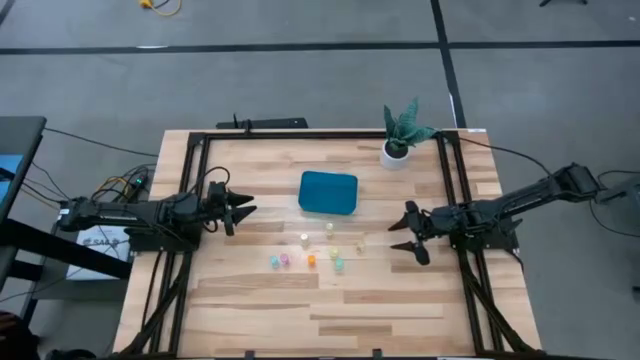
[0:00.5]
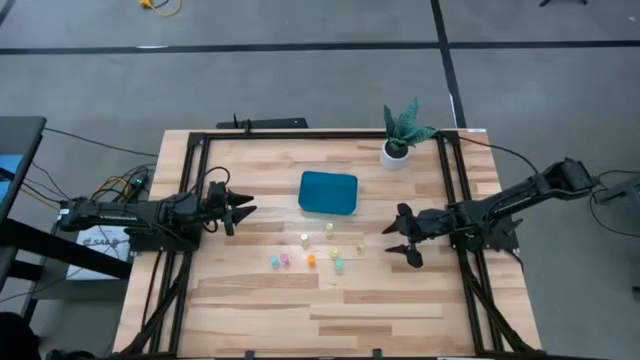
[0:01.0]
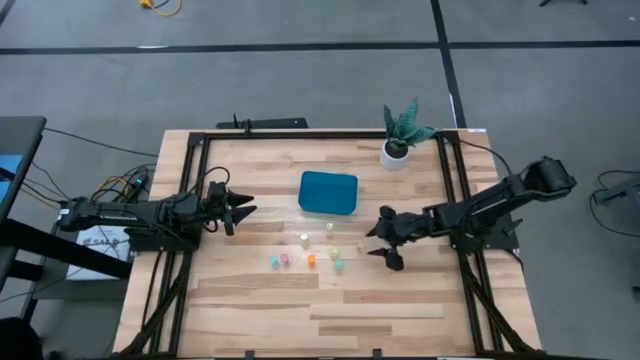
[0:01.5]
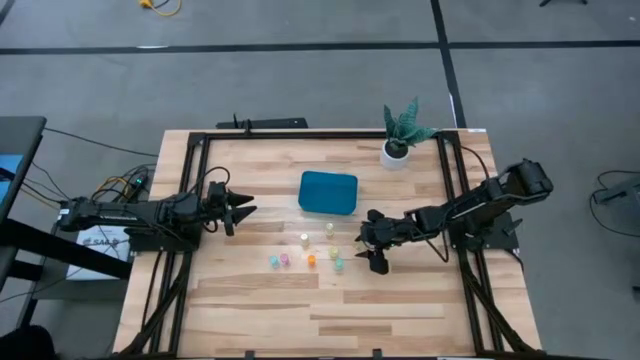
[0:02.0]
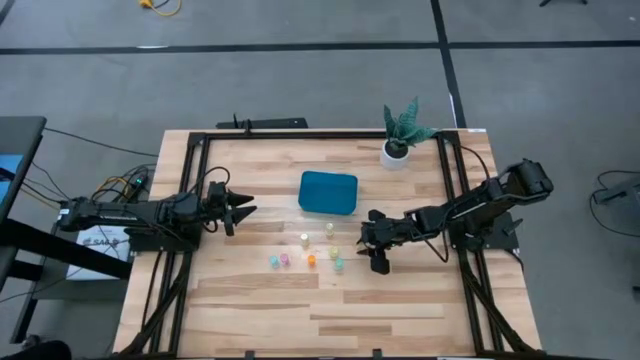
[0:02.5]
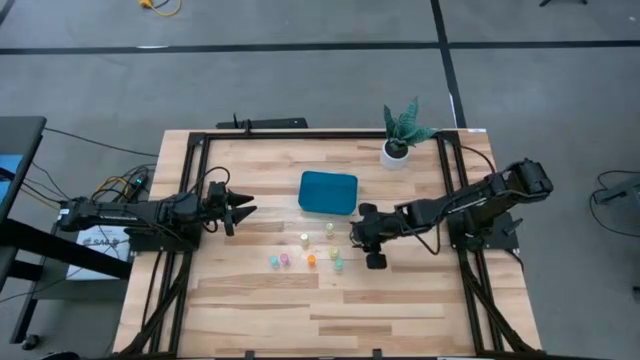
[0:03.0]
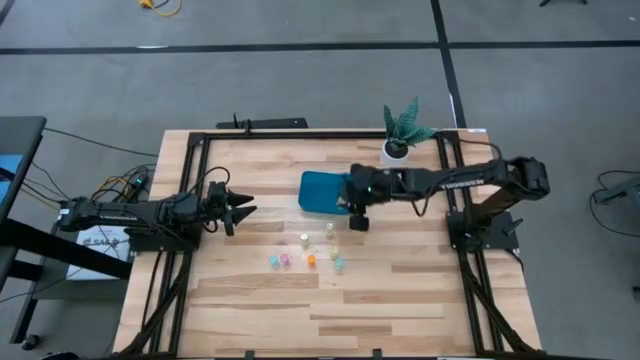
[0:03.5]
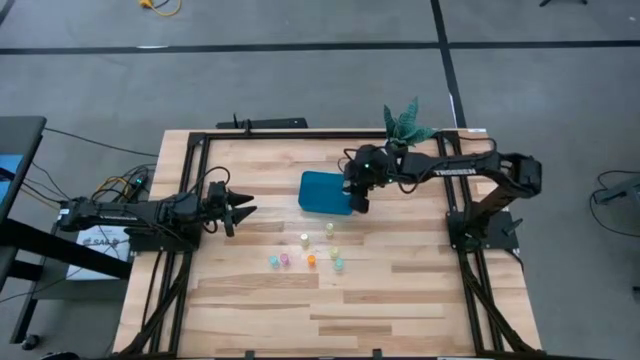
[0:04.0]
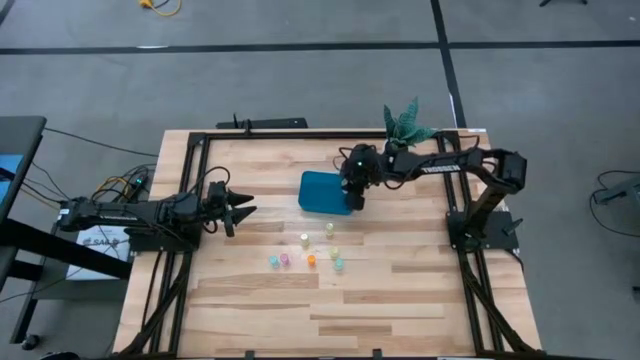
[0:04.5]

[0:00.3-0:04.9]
Task: Pick and place pill bottles into a basket
Put the green medicine bottle into the blue bin

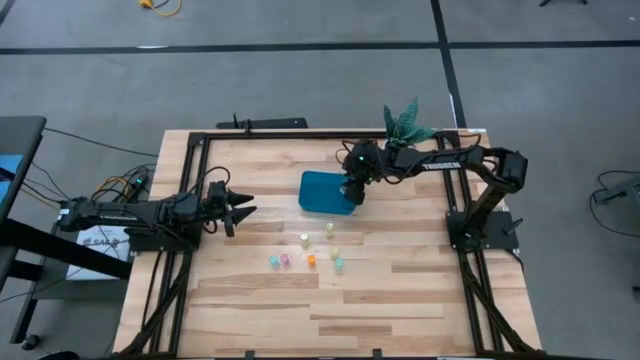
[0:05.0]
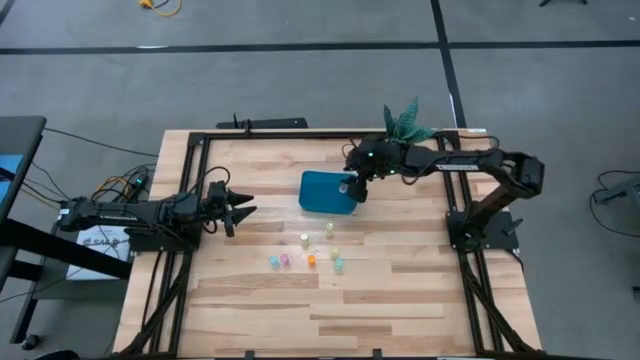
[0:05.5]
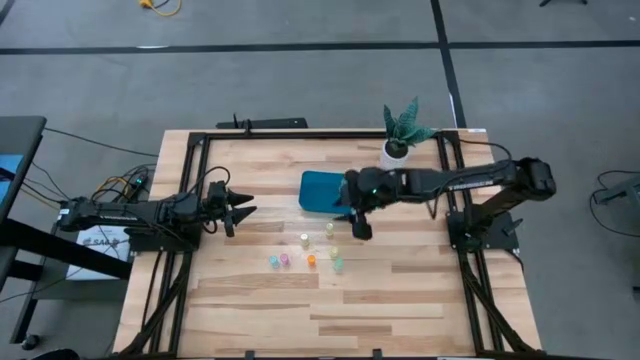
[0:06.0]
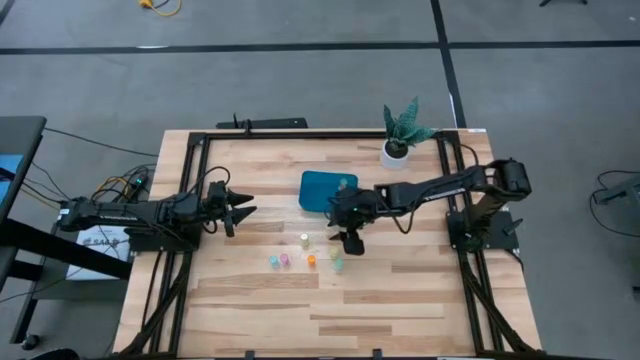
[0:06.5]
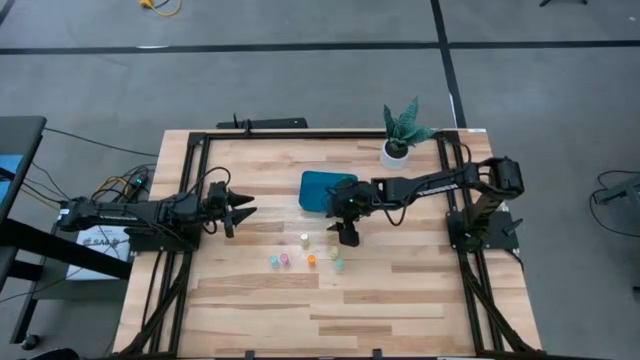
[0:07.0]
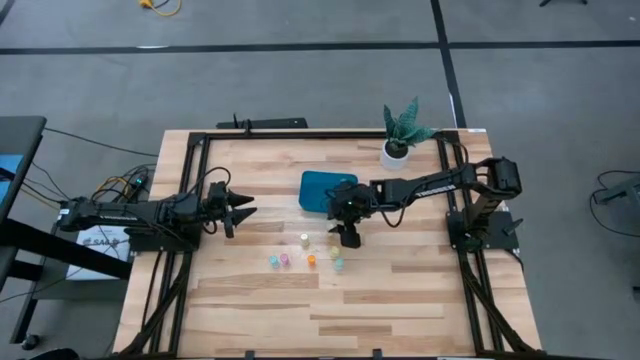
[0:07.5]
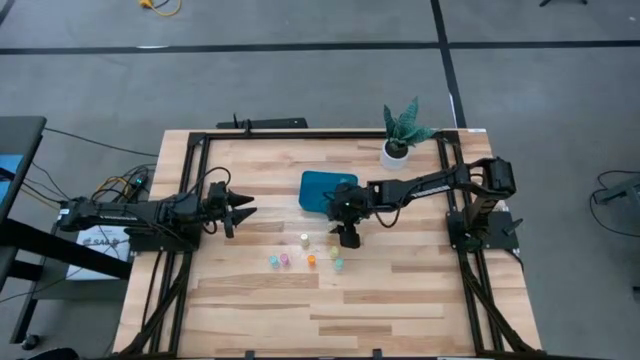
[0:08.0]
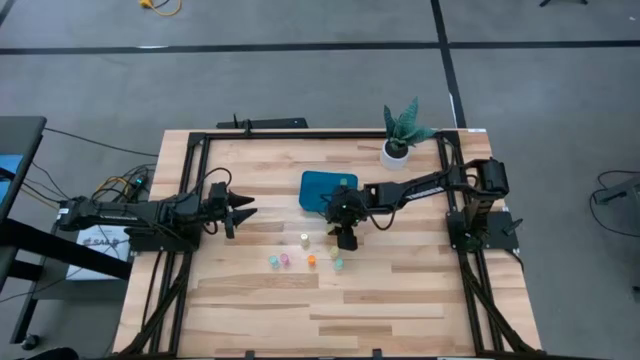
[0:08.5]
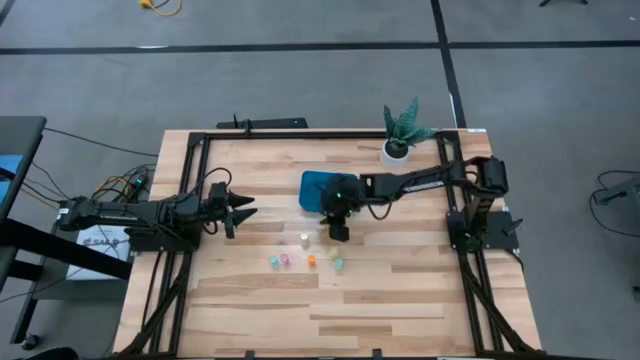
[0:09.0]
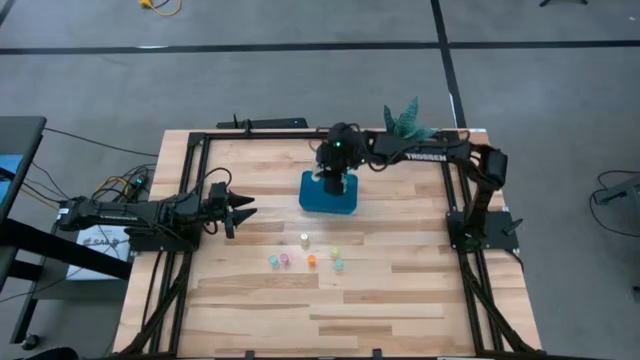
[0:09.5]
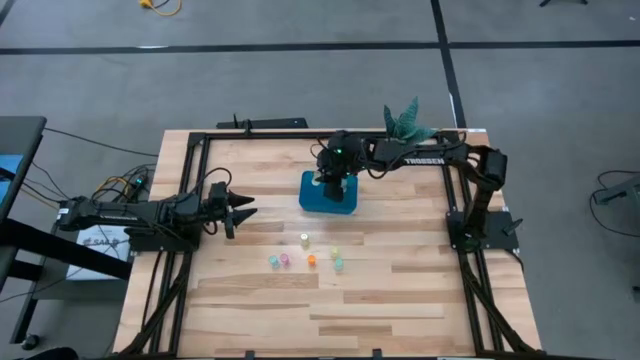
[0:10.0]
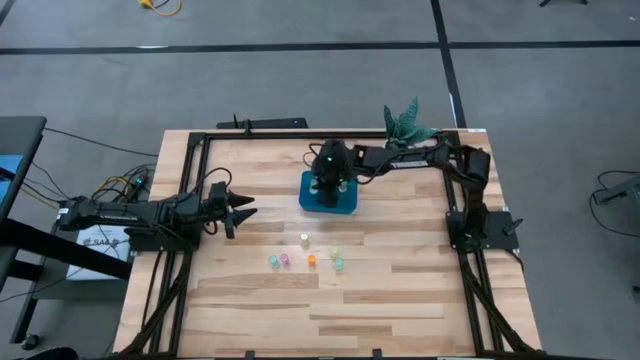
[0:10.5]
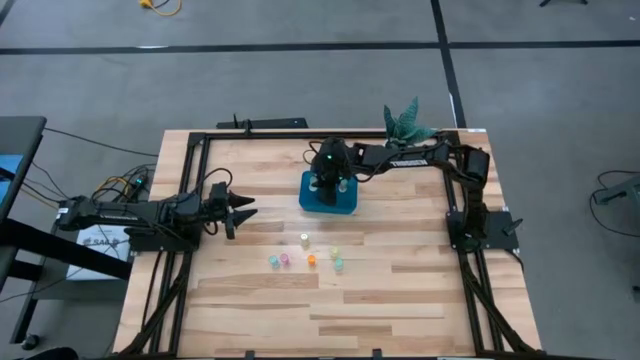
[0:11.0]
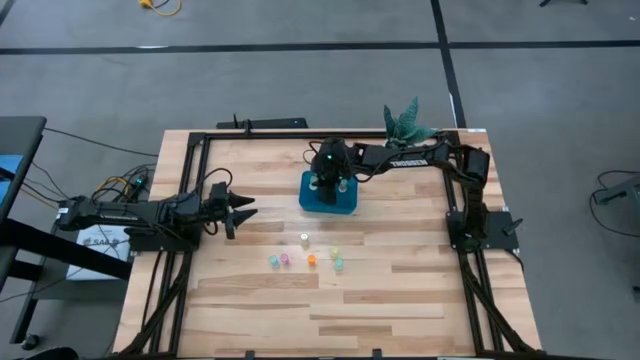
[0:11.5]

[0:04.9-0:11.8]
Put the green medicine bottle into the blue bin

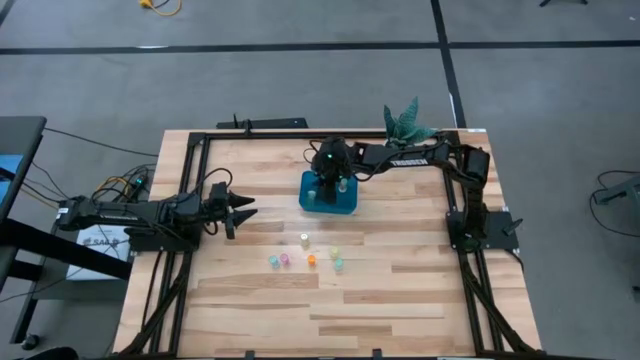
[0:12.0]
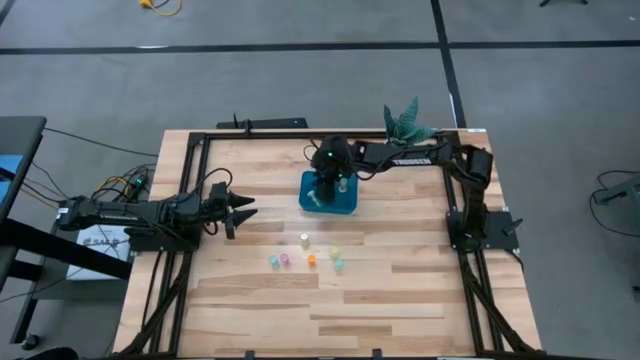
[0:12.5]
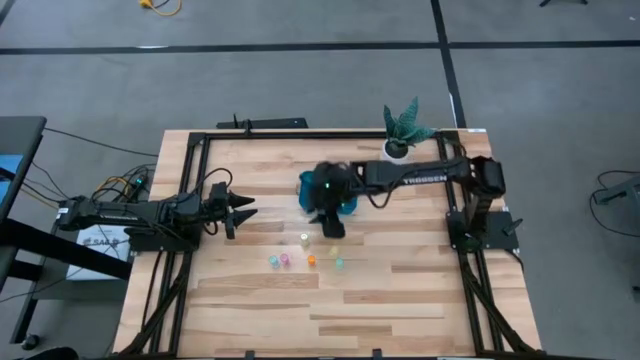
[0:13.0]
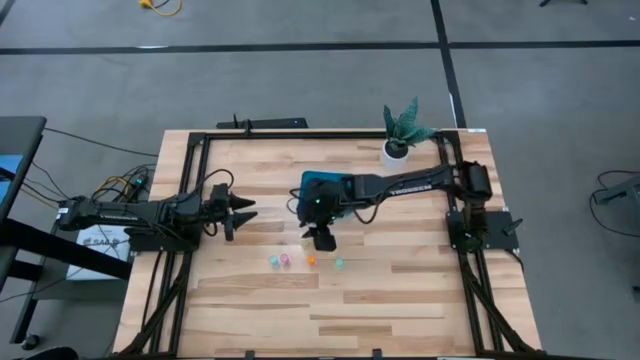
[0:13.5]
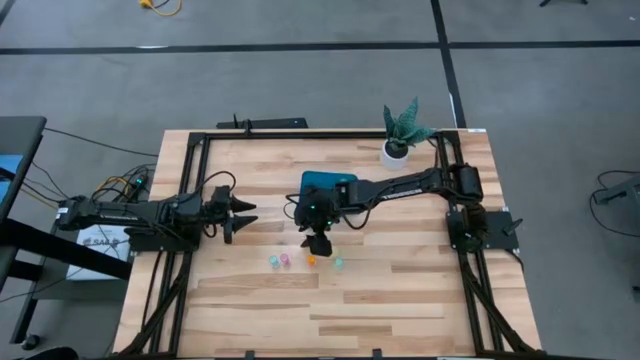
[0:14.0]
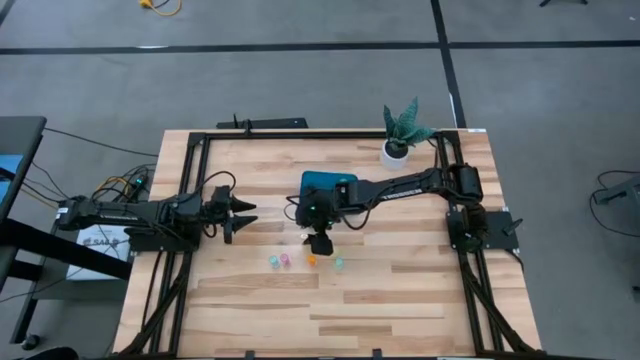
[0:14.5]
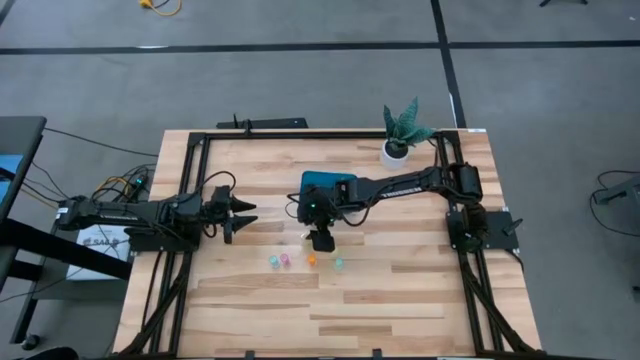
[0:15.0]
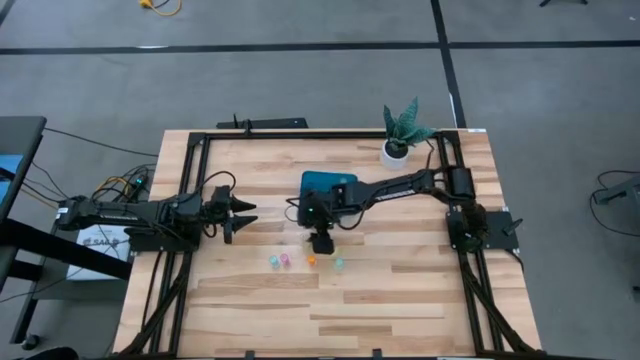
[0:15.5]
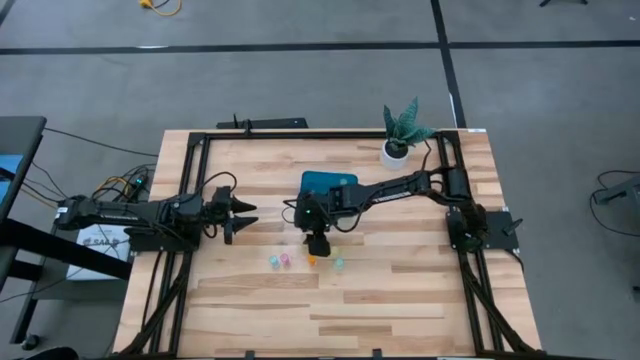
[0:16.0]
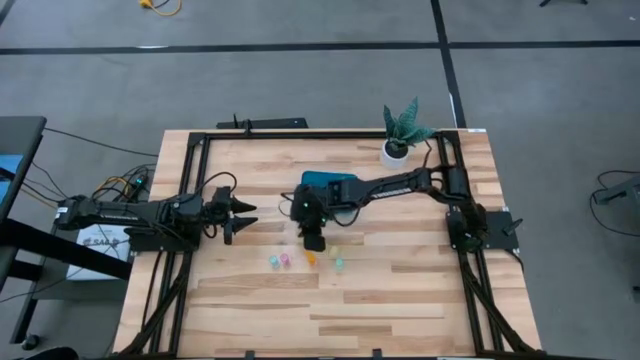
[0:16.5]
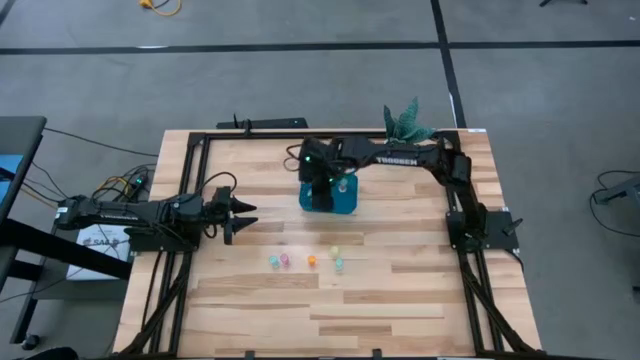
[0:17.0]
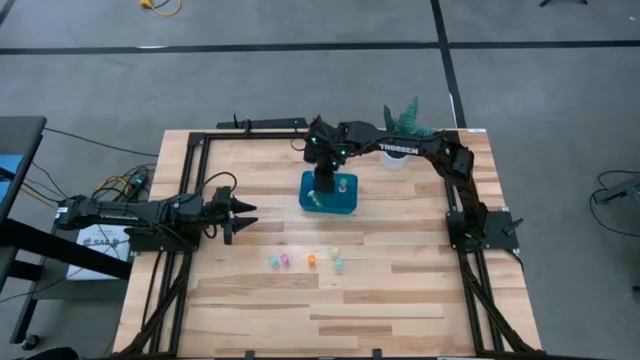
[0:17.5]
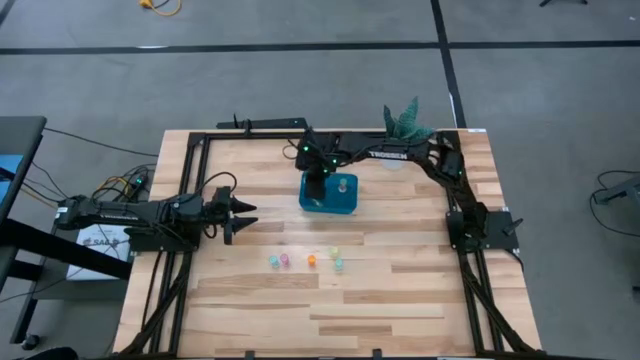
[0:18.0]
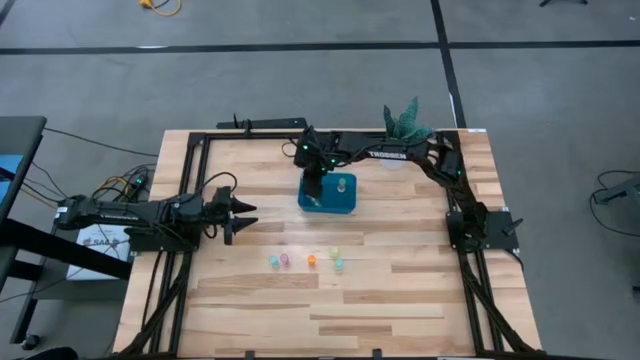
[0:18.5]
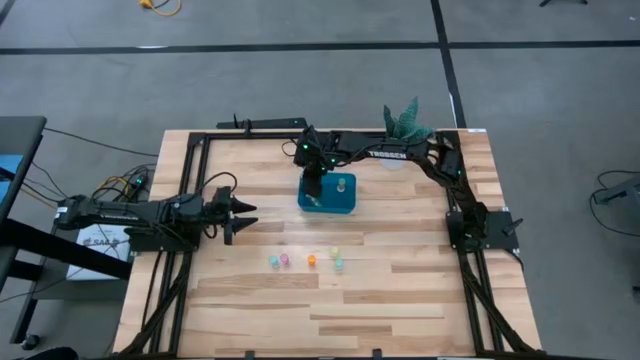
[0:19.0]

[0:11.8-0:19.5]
Put the green medicine bottle into the blue bin

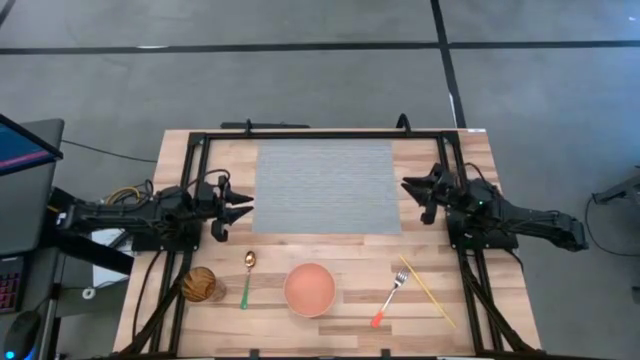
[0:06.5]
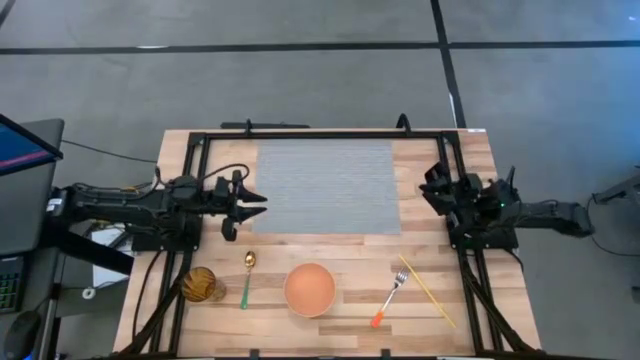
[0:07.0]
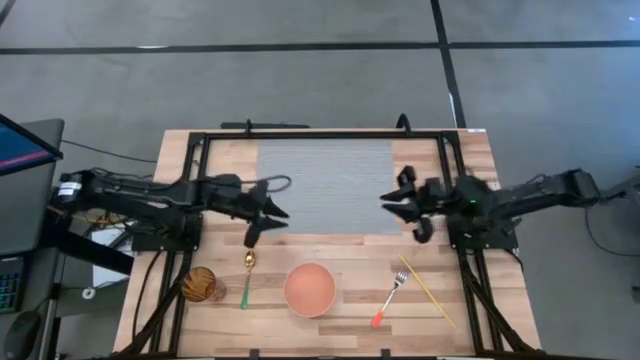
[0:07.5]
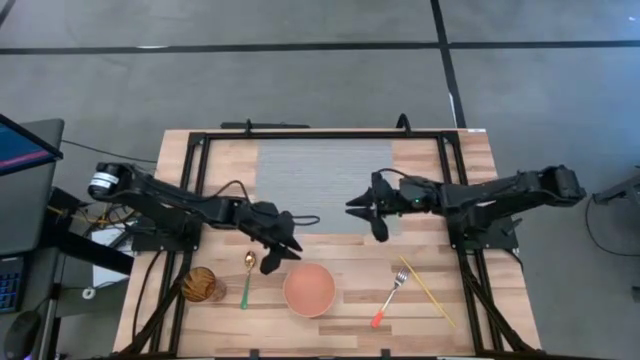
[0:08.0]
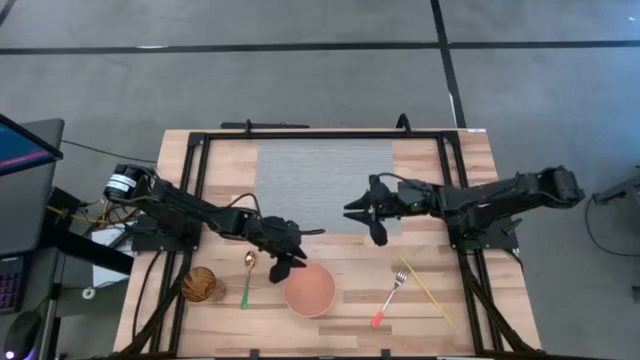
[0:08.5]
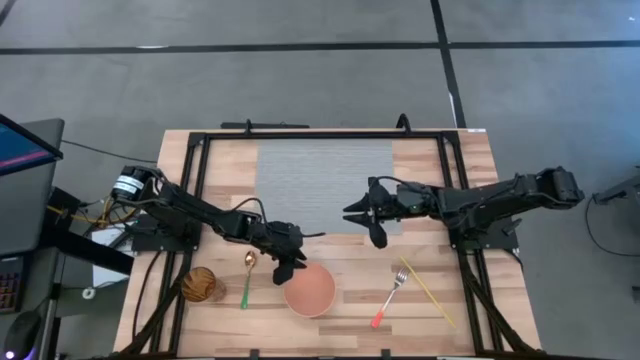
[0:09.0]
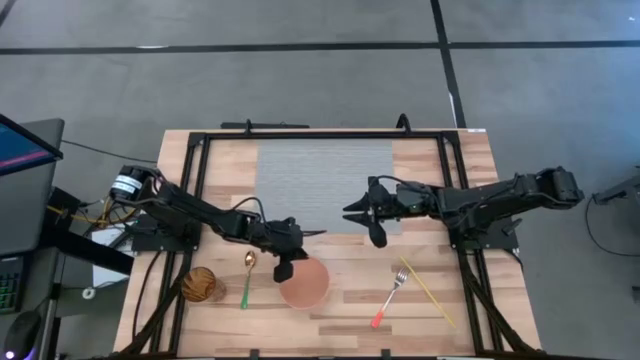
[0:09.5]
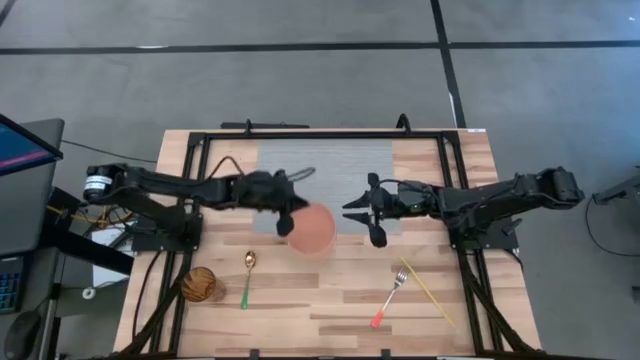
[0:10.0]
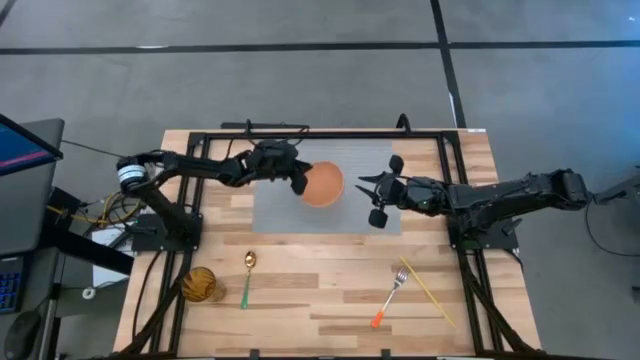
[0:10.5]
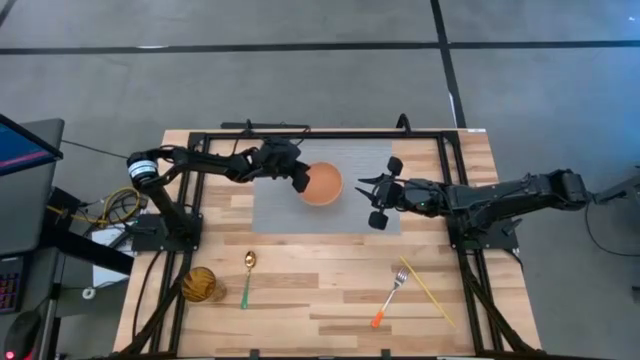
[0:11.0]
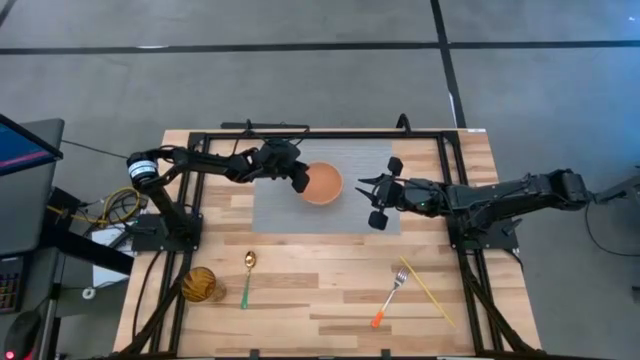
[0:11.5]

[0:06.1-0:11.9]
Task: Pick & Place Utensil
Put the brown bowl on the gray tablemat
